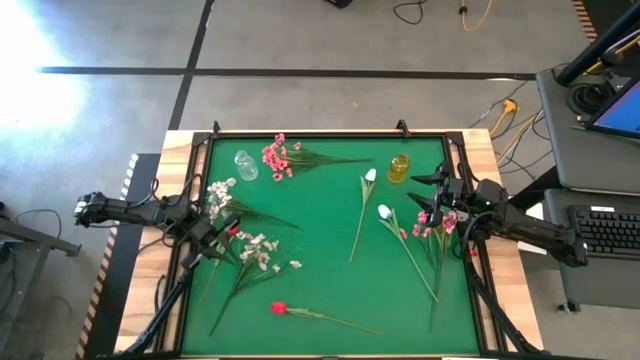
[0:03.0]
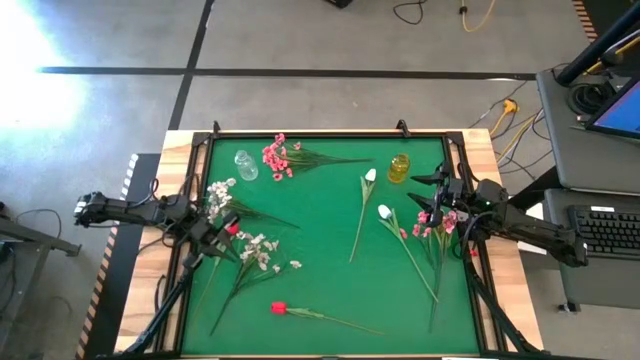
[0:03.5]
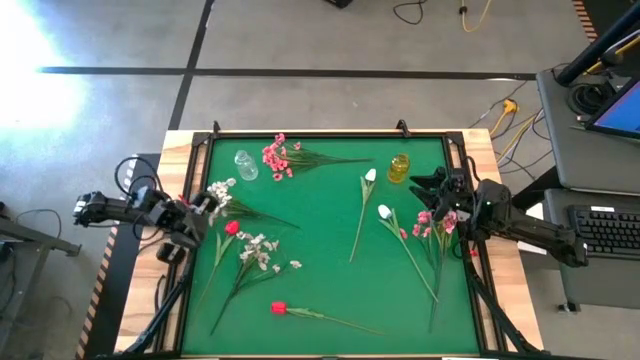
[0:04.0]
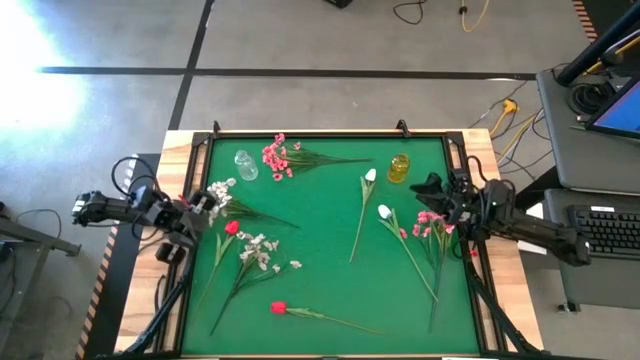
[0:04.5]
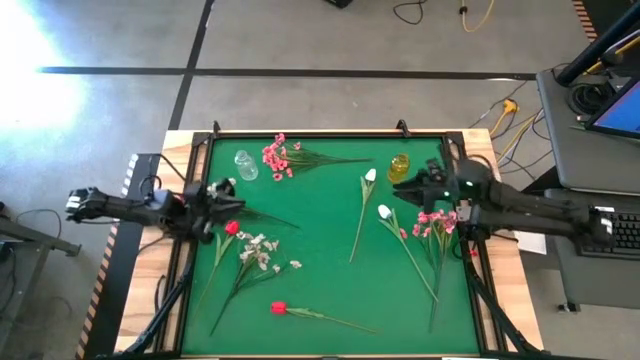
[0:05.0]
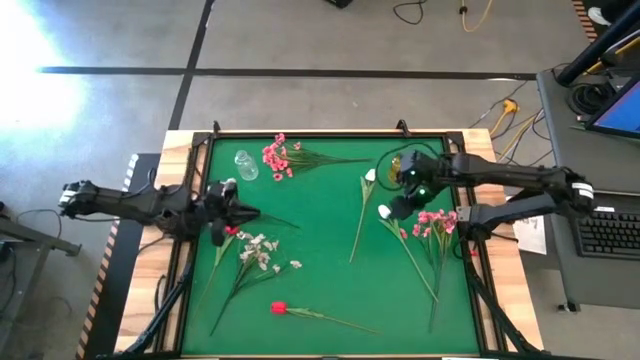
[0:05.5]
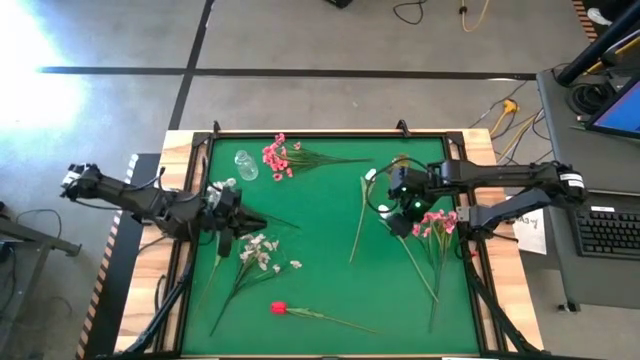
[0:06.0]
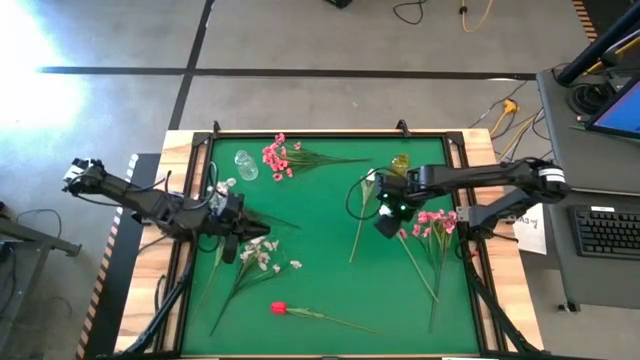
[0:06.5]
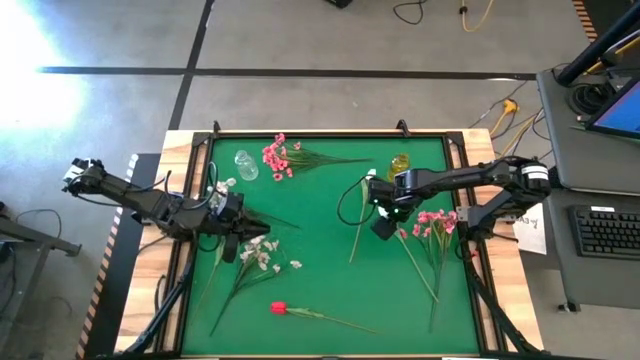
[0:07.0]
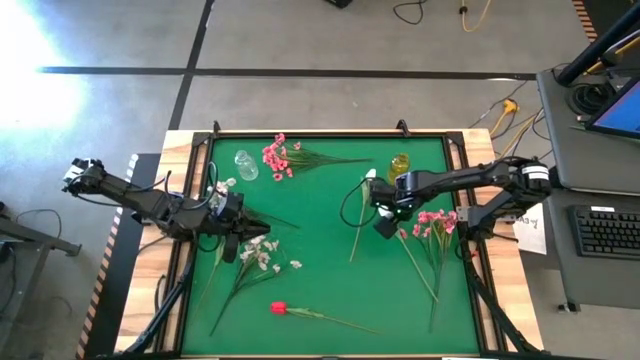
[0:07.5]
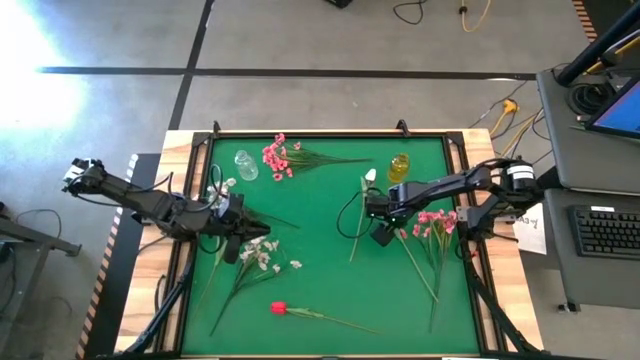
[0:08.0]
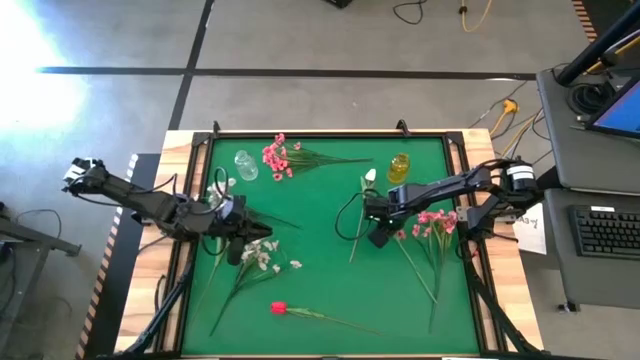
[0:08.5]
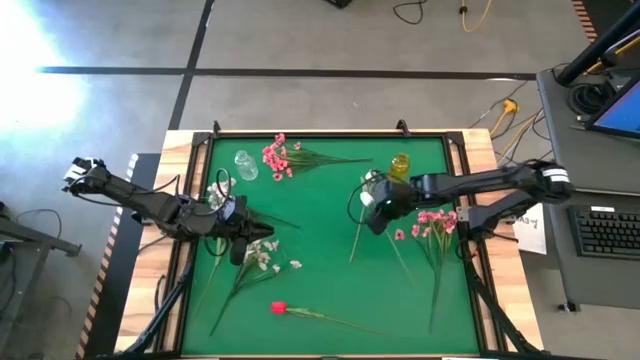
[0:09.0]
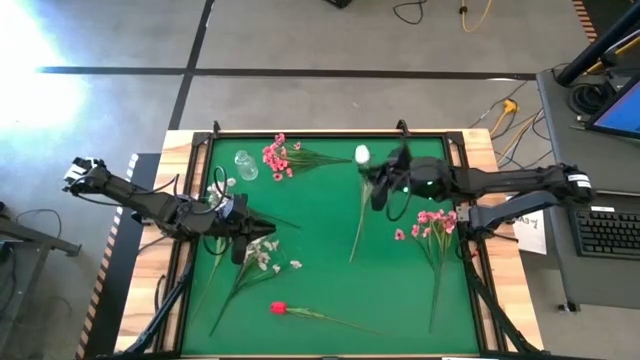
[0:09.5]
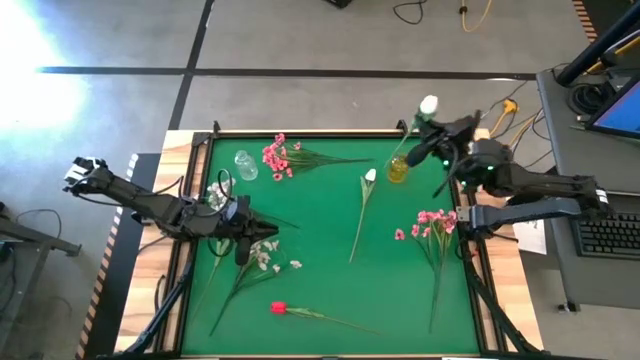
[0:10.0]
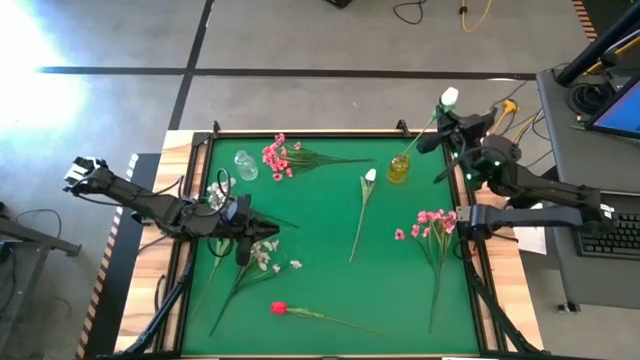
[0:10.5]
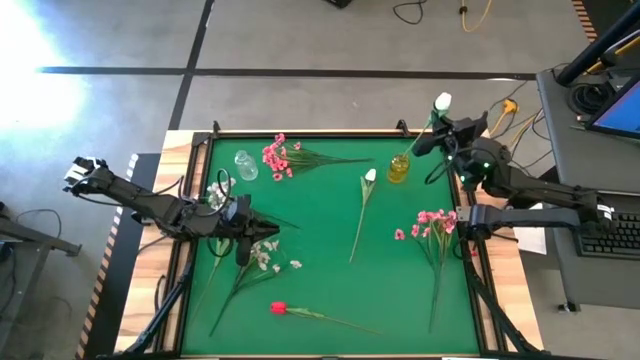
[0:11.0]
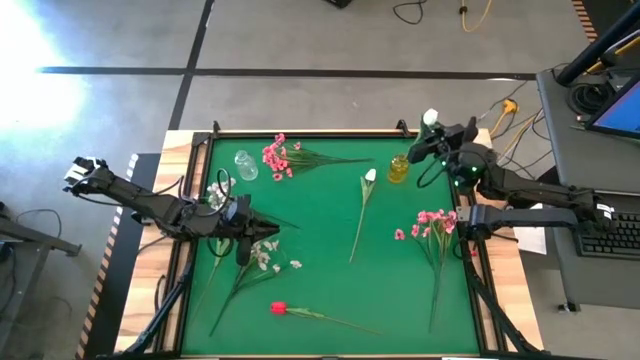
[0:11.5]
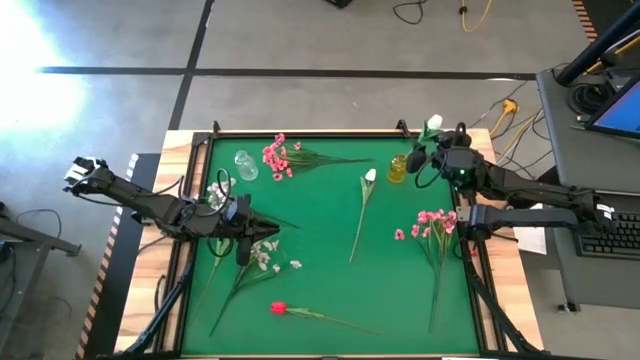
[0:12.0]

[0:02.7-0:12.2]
Task: Sort flowers into vase by color
Put the right white tulip into the yellow vase

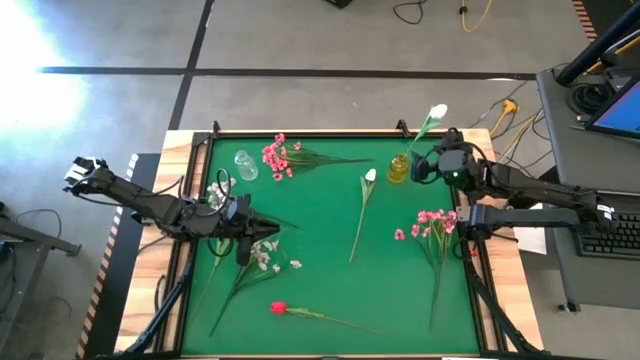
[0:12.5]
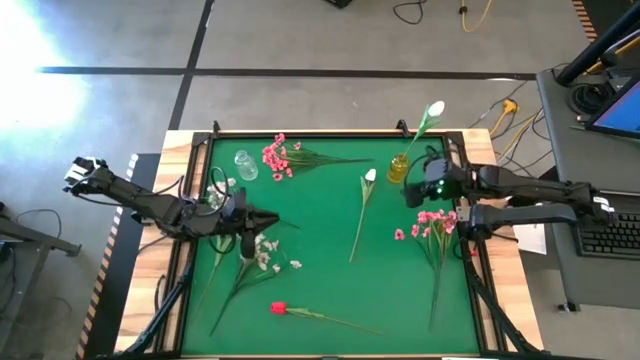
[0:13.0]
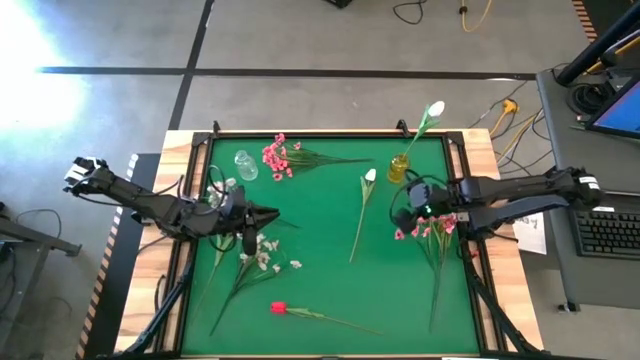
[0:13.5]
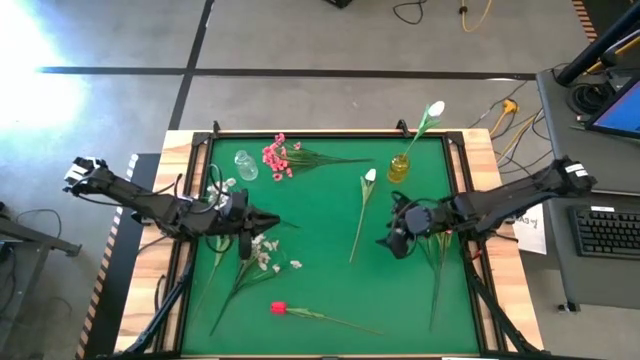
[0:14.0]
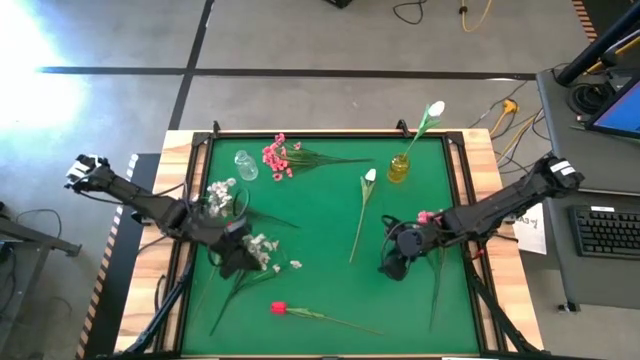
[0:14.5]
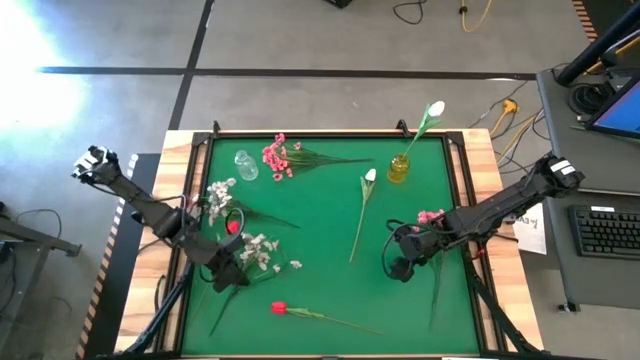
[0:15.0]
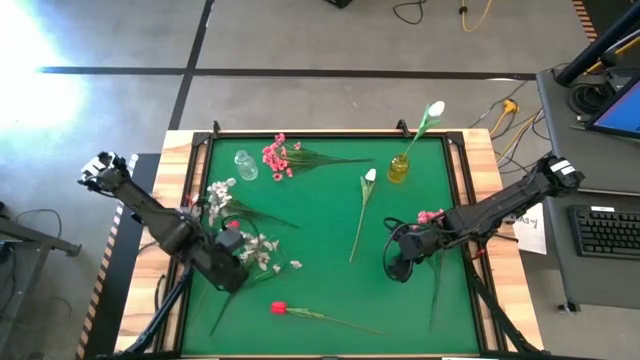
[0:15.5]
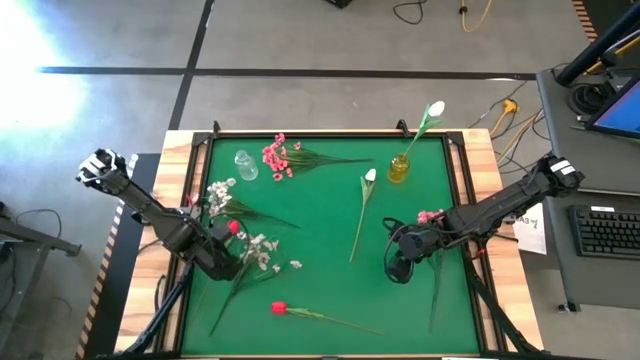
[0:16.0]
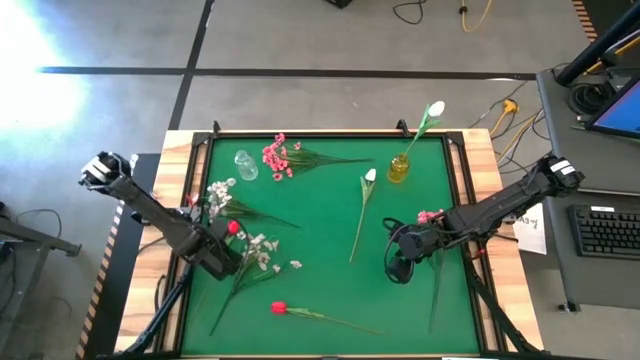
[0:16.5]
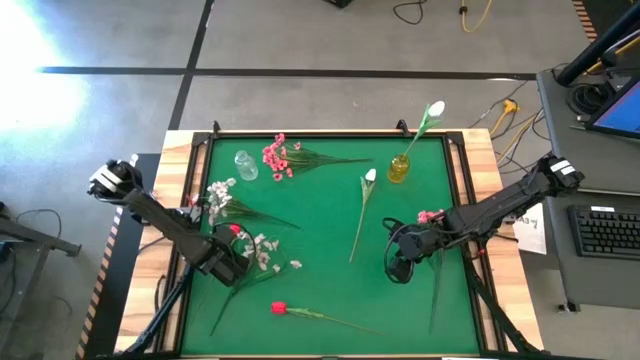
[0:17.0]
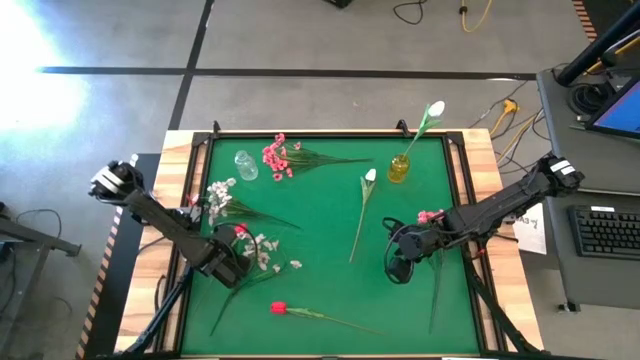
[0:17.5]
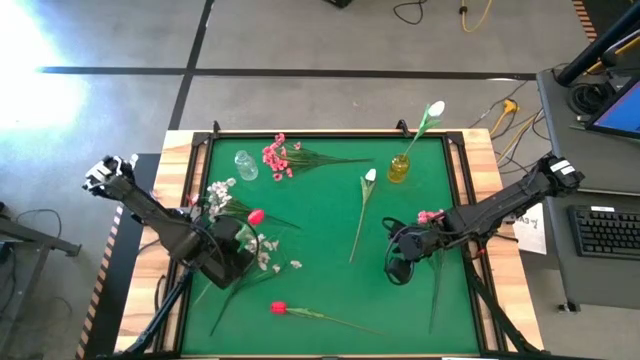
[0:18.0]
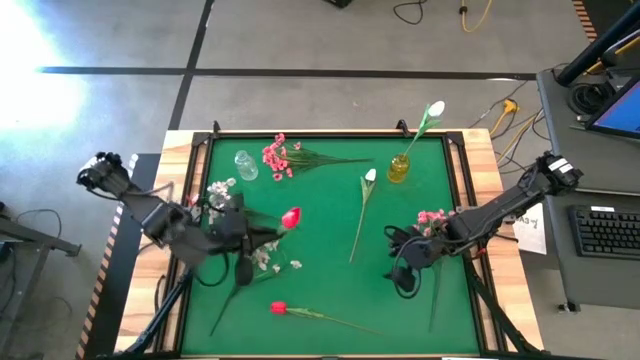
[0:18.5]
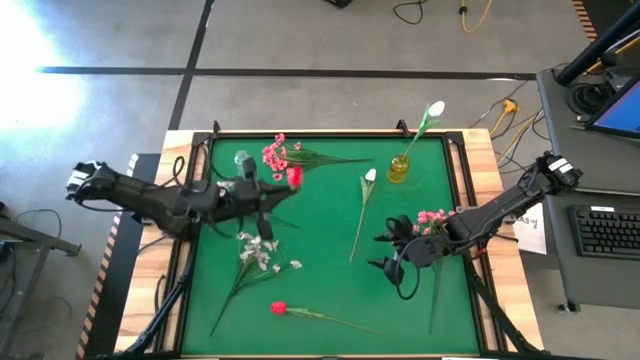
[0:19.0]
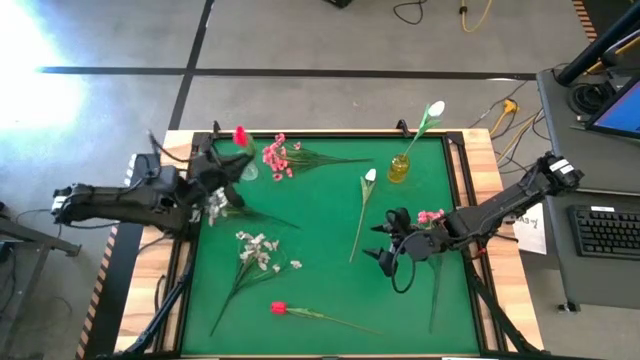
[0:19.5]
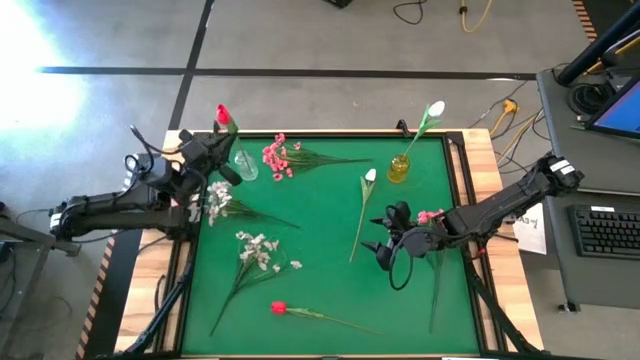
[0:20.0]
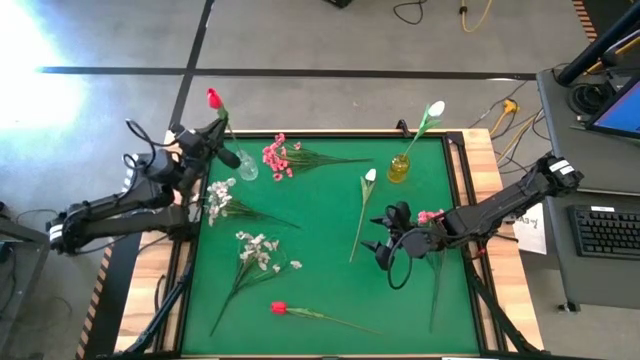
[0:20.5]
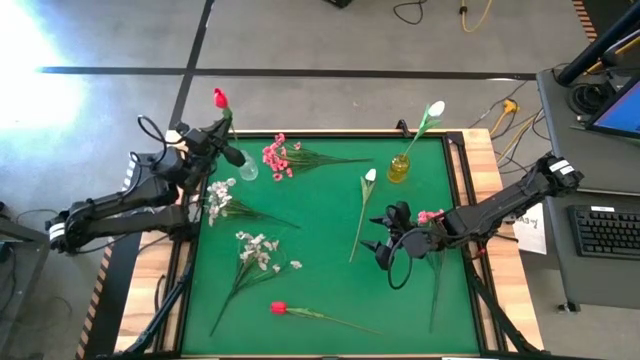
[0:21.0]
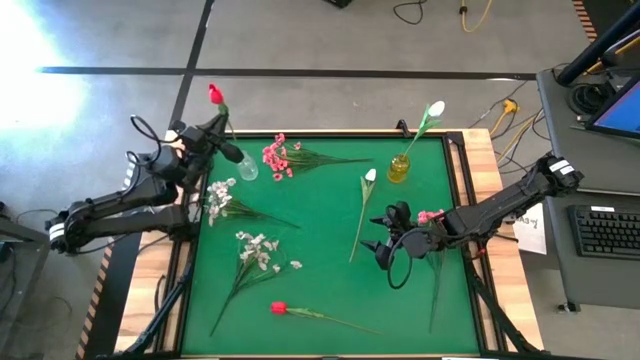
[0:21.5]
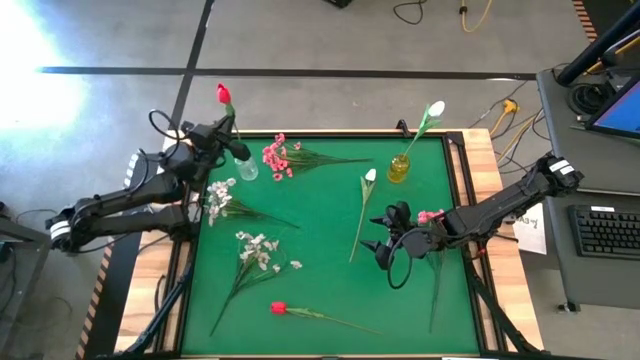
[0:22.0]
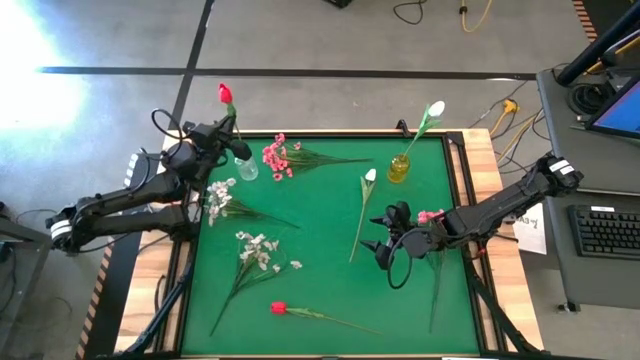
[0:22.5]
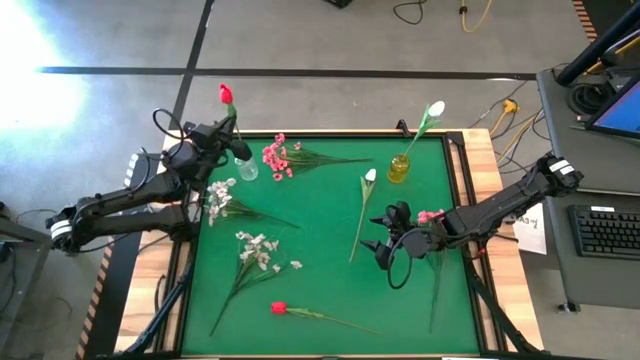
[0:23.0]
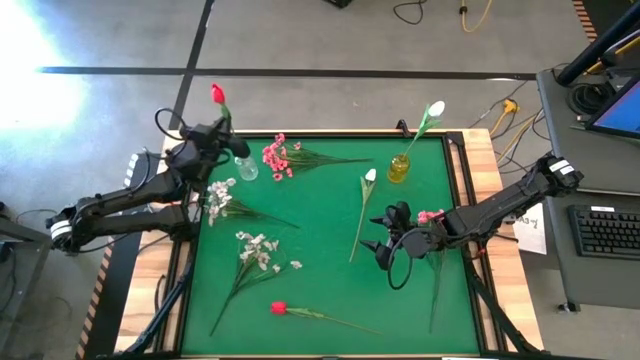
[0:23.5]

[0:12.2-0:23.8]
Put the left red tulip into the transparent vase
